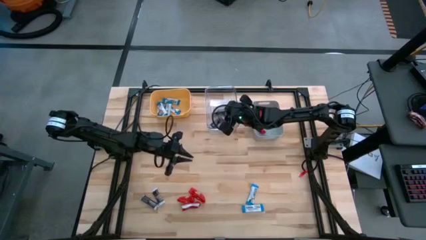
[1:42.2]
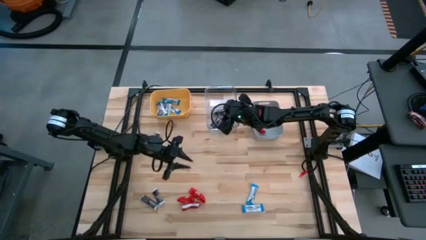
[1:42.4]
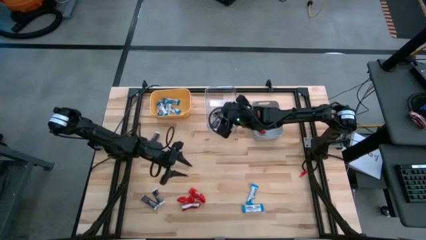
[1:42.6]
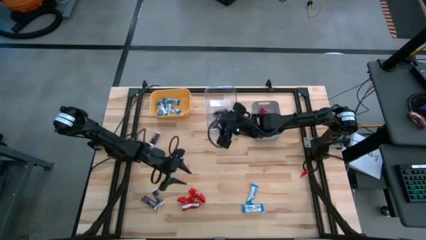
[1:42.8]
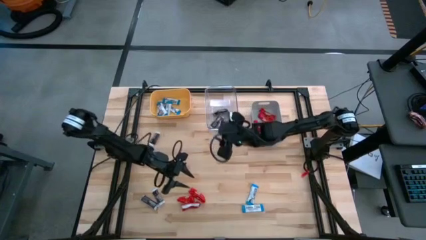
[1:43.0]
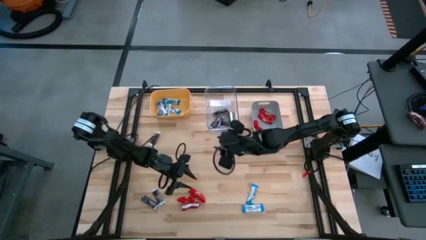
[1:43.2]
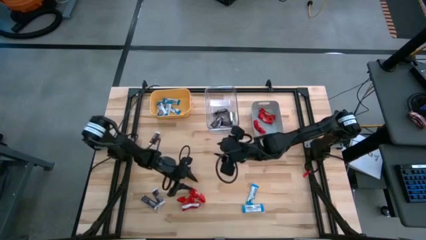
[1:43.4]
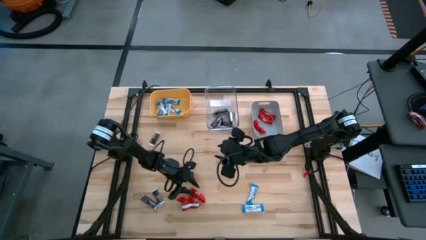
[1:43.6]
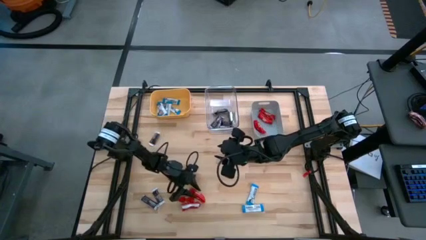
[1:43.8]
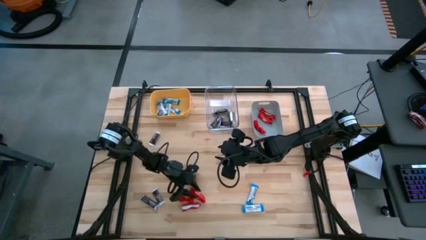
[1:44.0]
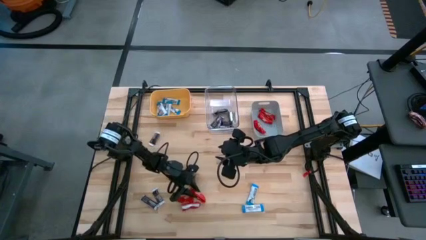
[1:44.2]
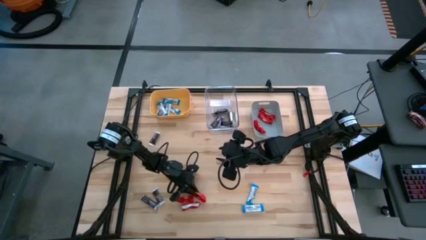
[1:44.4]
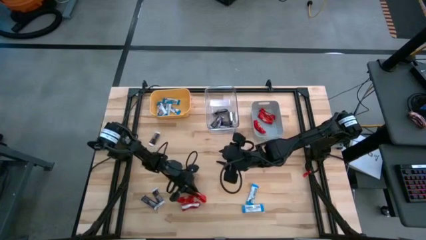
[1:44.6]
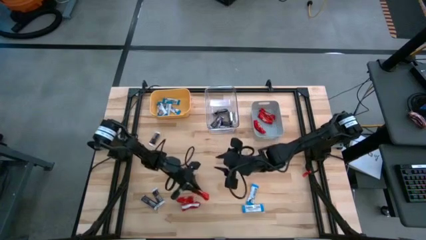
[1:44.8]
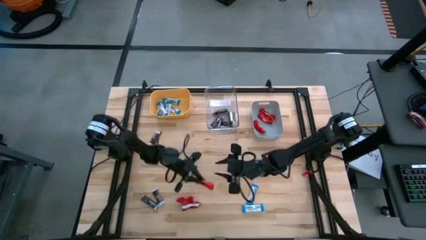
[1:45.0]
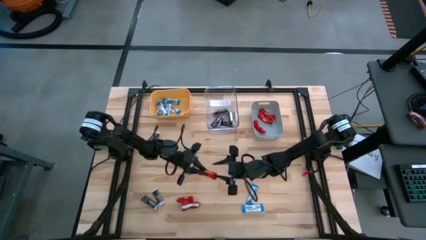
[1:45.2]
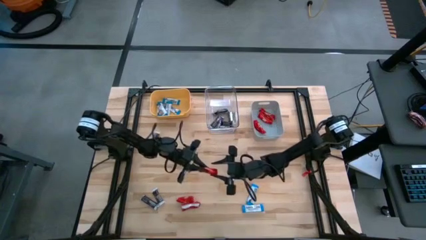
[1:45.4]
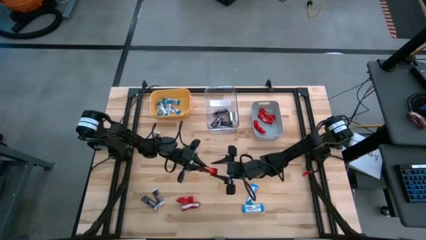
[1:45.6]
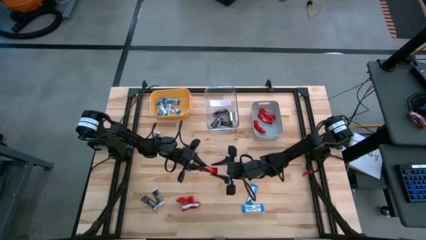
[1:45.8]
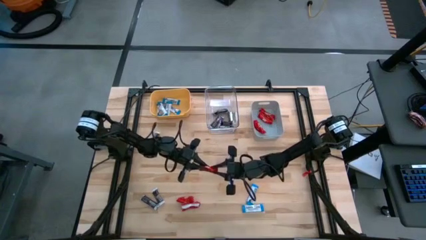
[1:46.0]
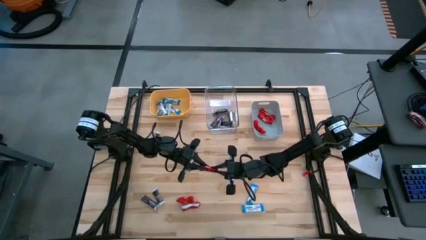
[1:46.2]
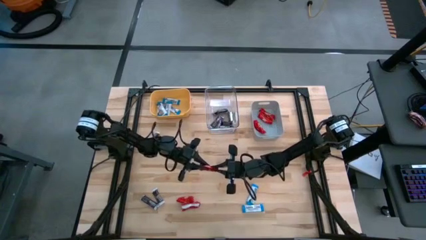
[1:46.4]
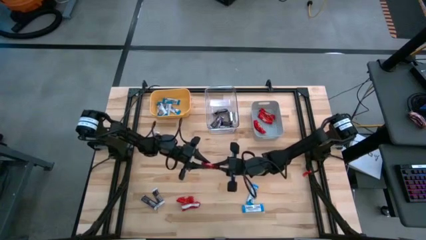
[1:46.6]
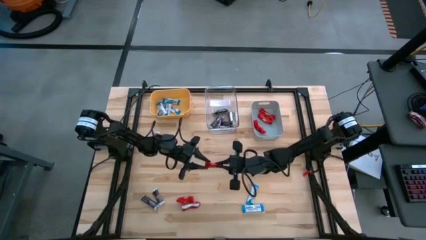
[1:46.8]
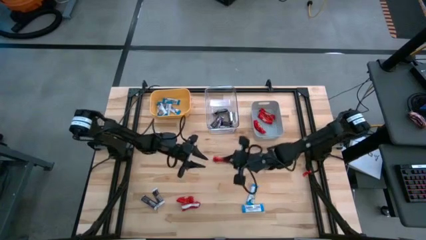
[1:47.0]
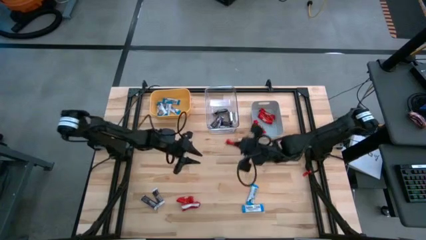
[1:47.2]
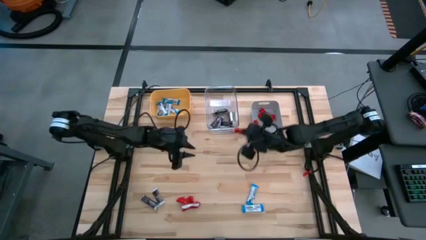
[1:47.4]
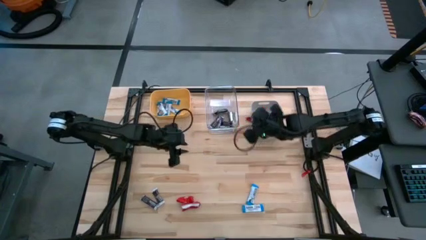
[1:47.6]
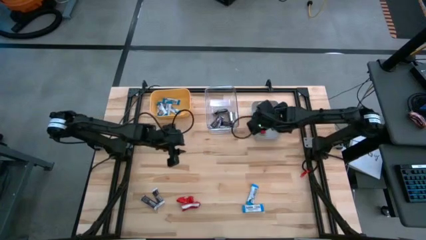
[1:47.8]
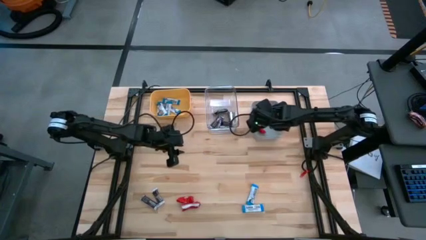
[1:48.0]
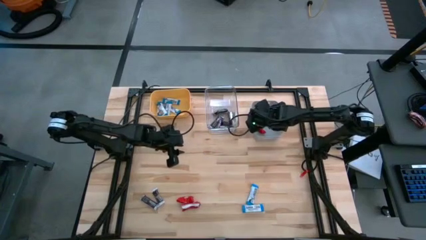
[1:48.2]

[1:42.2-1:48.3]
Task: Sort candy
Put the red chocolate into the gray bin

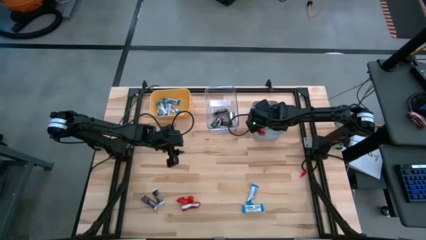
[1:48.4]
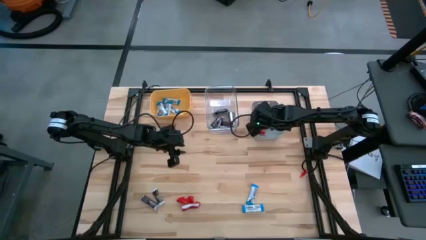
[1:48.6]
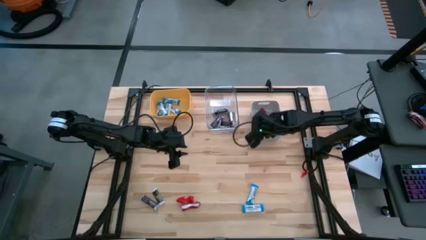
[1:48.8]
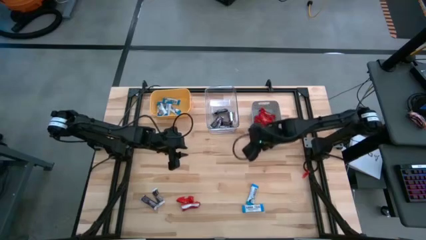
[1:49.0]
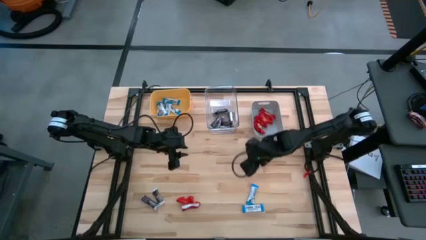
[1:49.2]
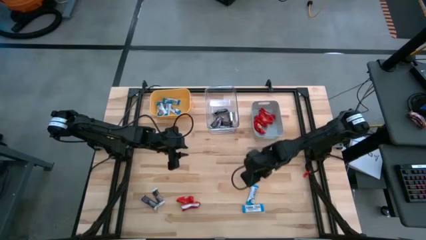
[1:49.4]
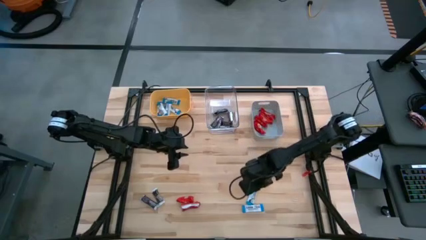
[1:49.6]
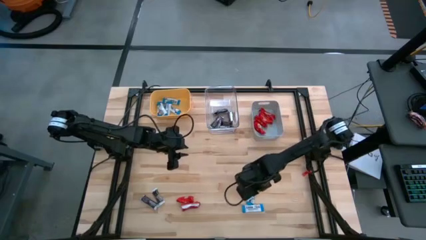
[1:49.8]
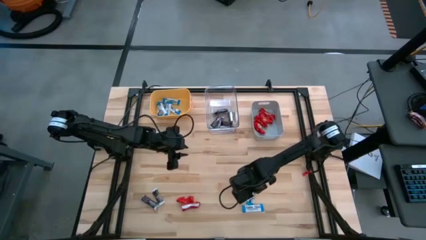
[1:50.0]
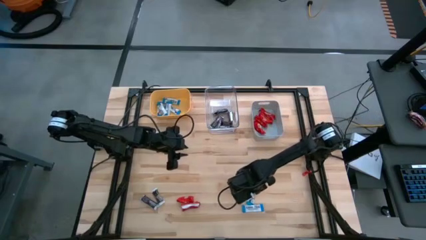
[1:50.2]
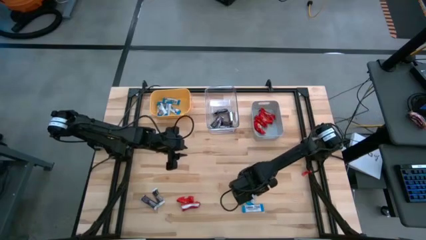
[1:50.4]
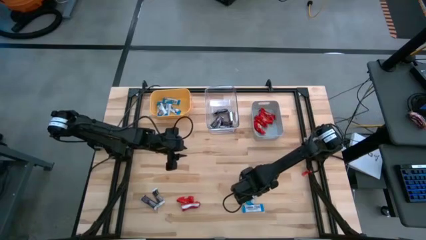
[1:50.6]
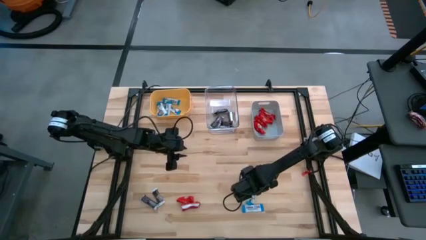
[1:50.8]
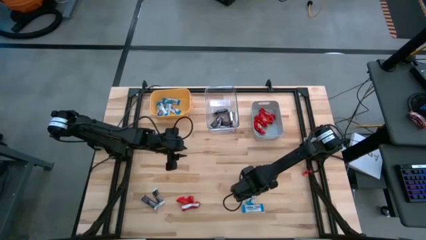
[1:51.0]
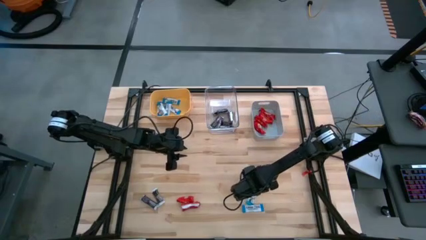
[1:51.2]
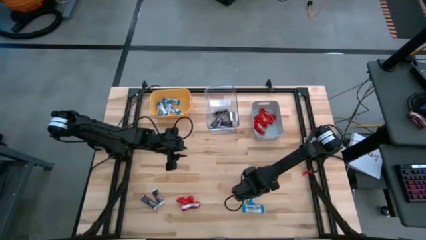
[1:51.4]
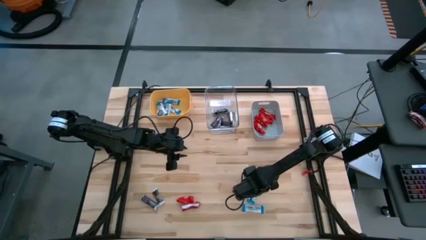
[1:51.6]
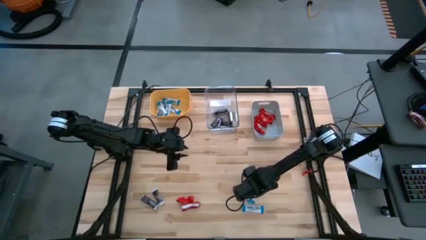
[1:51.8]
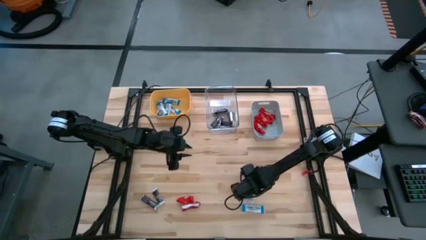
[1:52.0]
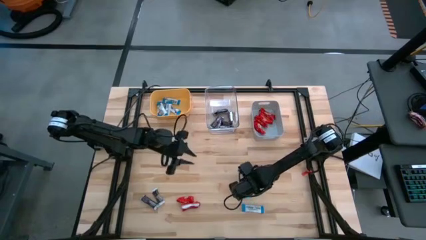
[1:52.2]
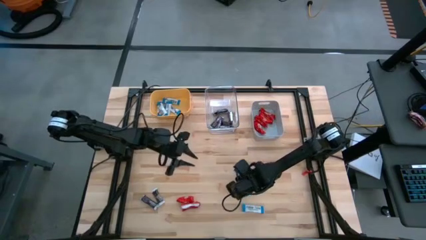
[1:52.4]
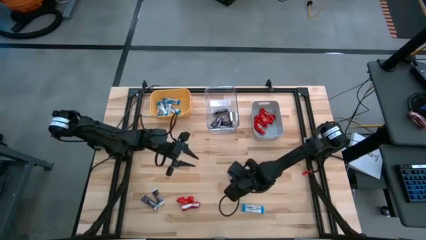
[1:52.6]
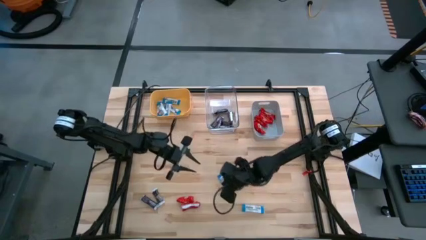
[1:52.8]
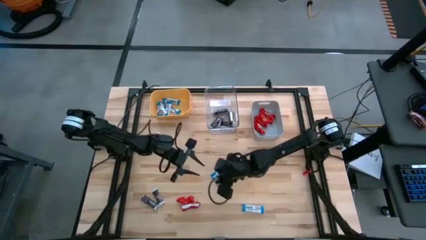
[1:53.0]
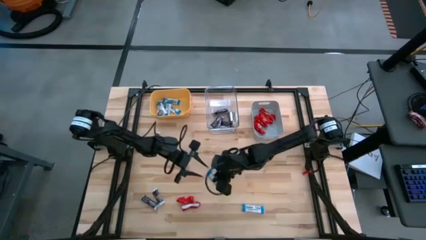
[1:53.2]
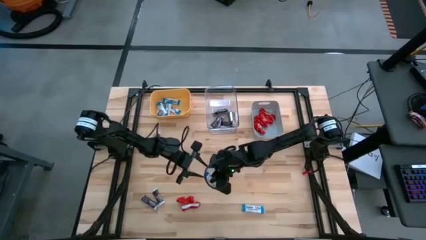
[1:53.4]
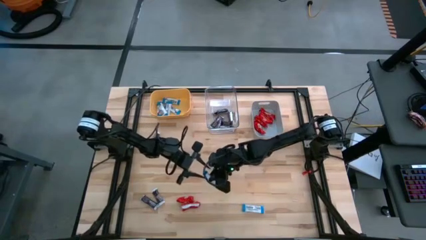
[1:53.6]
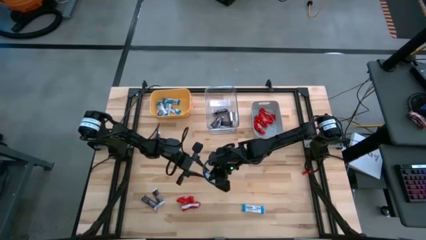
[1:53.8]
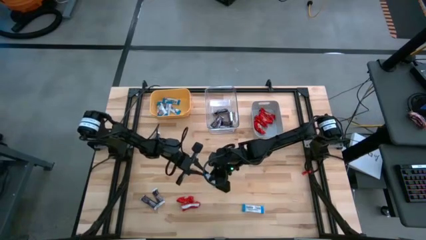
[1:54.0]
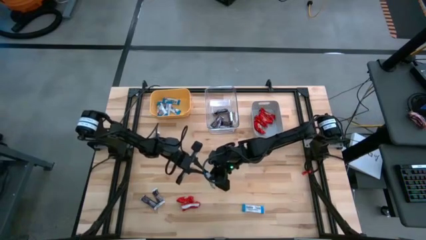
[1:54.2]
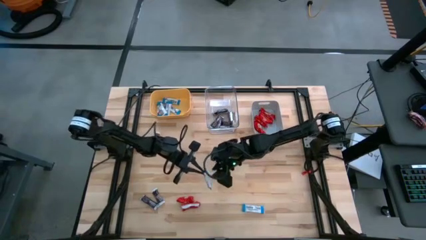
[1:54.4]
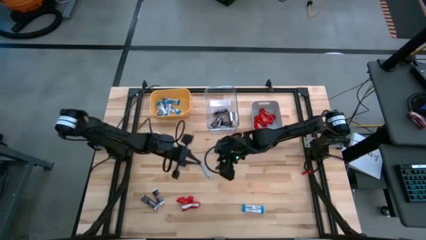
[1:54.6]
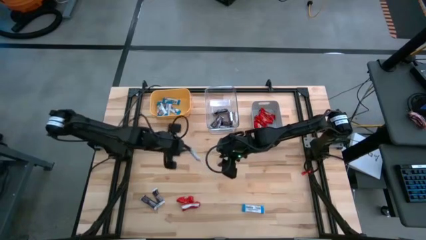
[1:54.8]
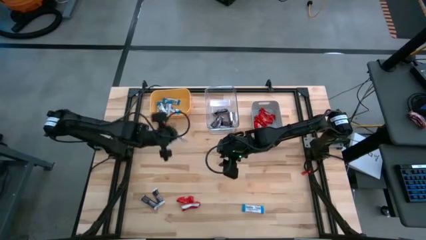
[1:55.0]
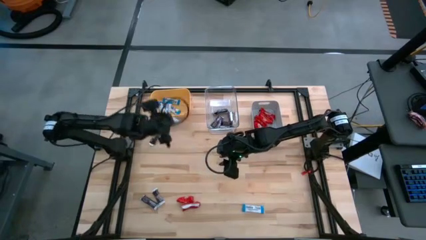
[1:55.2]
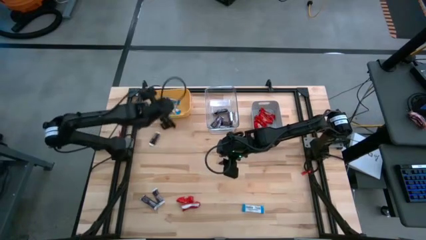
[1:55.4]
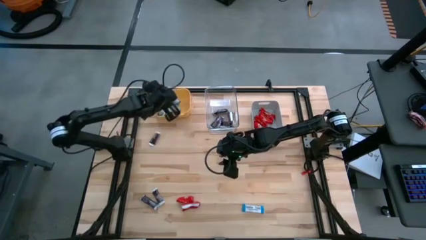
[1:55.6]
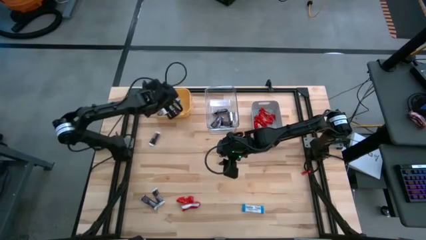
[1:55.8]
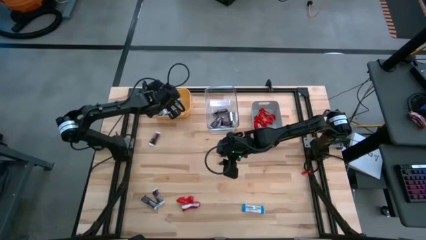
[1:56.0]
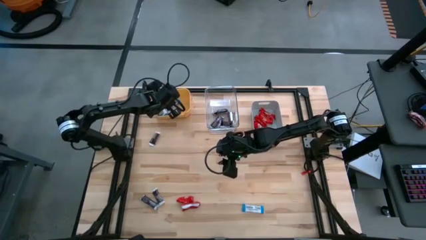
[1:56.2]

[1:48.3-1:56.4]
Put the white chocolate into the yellow bin
